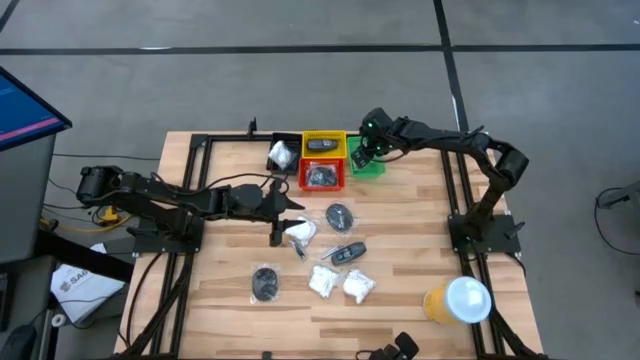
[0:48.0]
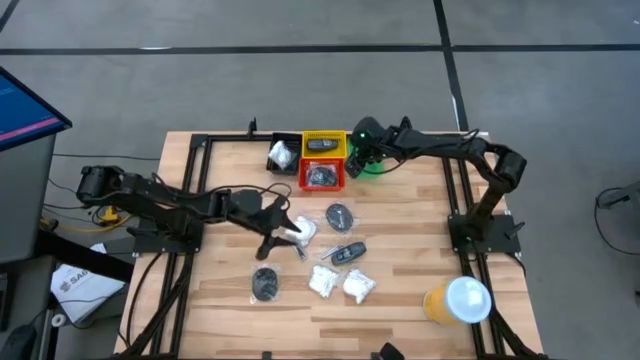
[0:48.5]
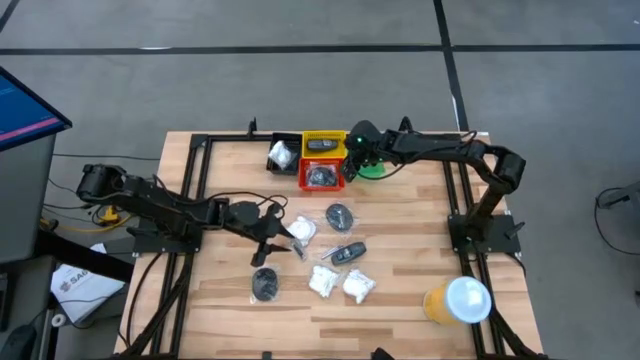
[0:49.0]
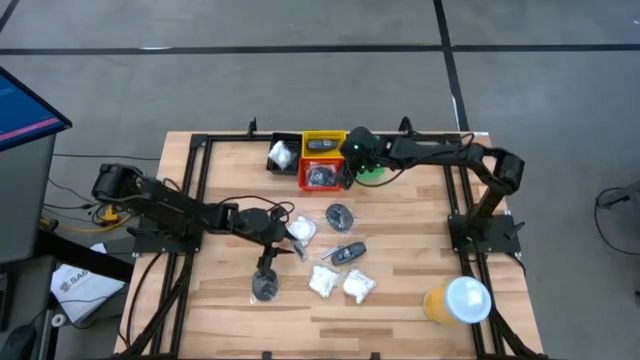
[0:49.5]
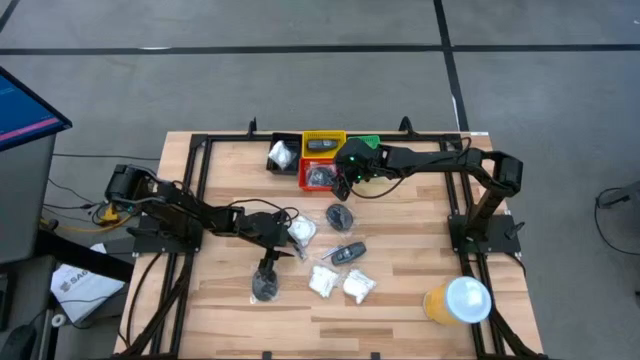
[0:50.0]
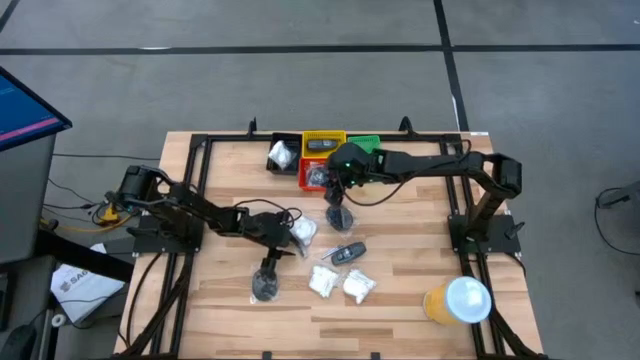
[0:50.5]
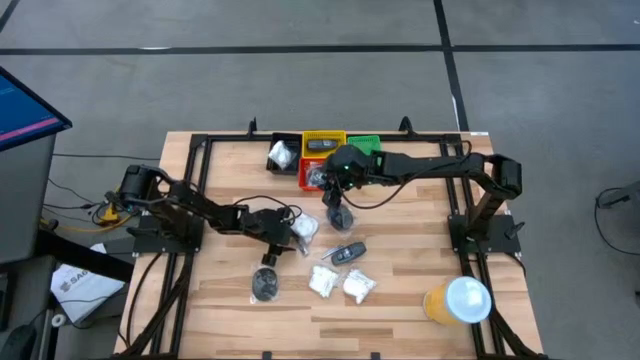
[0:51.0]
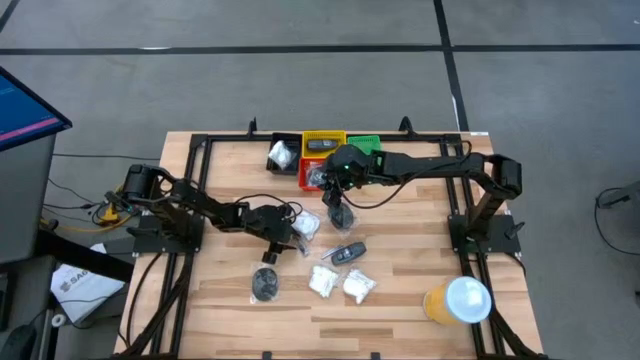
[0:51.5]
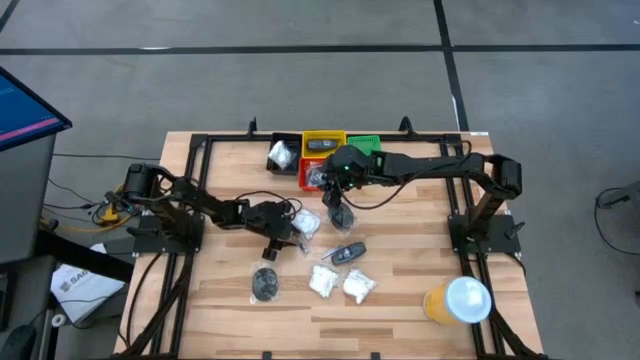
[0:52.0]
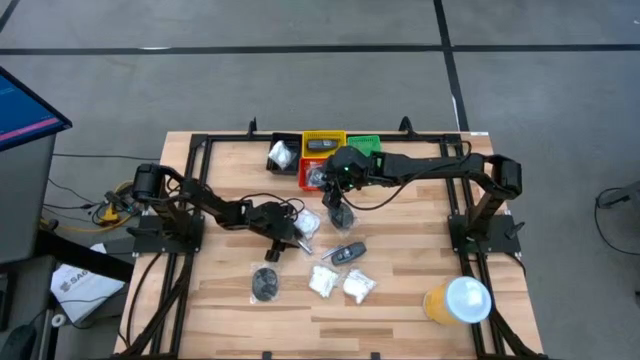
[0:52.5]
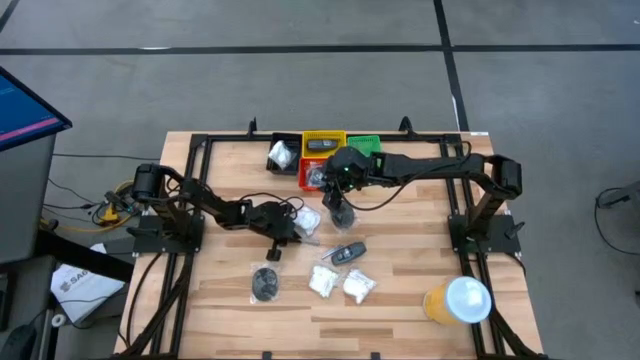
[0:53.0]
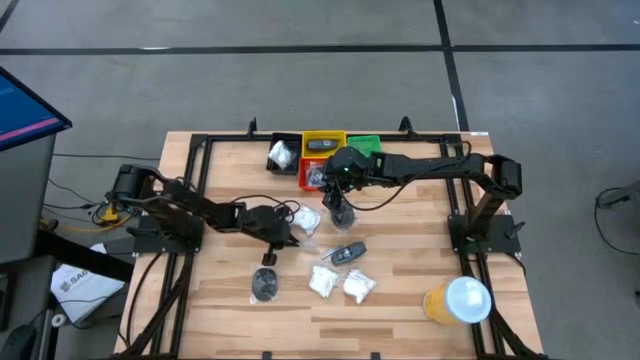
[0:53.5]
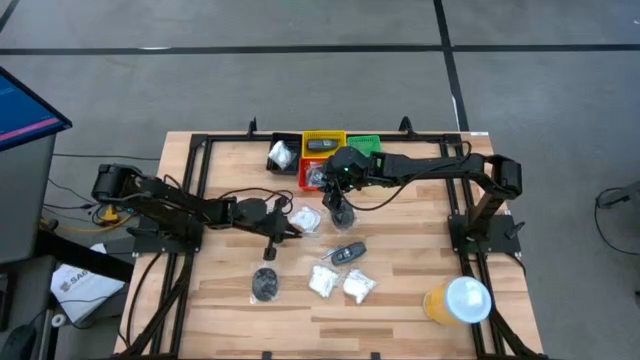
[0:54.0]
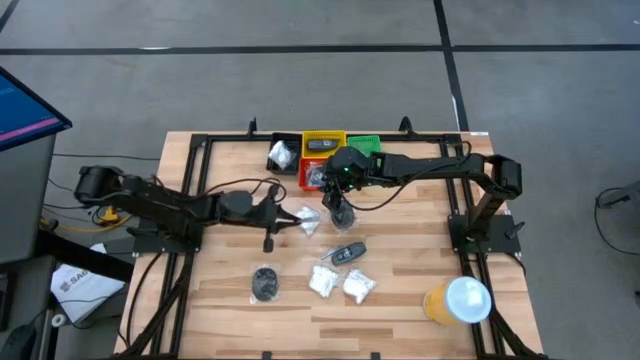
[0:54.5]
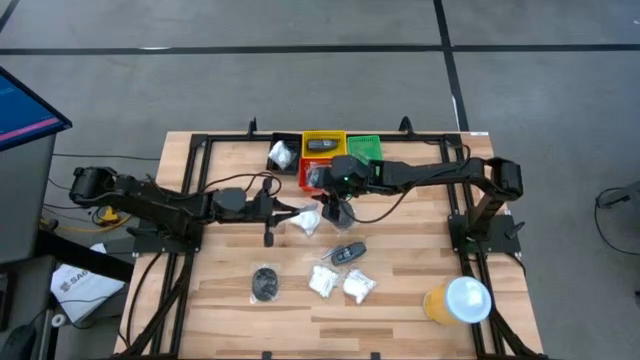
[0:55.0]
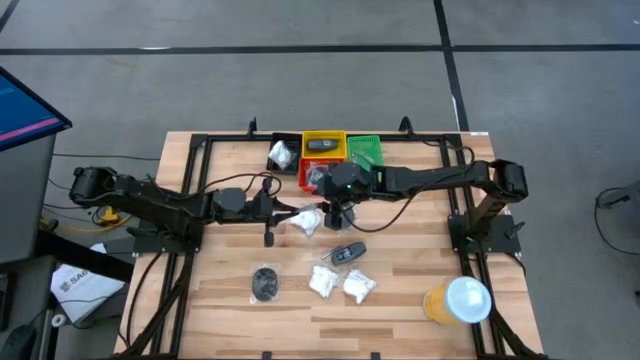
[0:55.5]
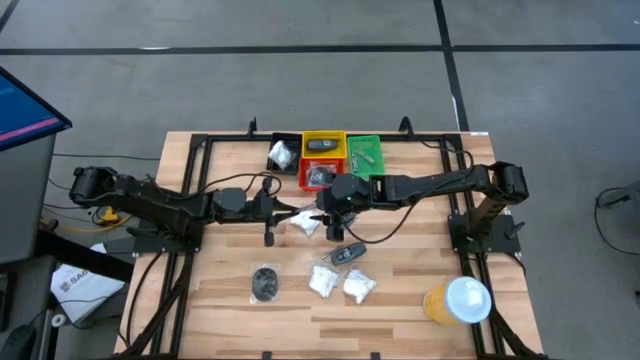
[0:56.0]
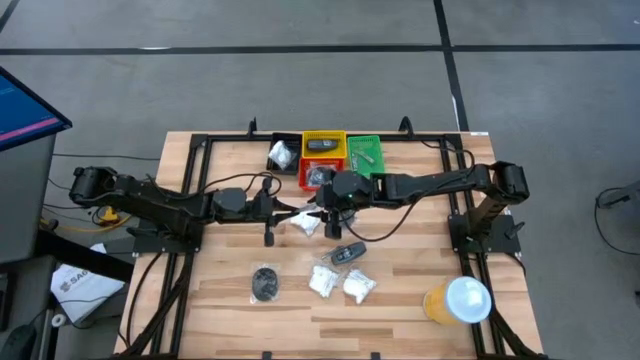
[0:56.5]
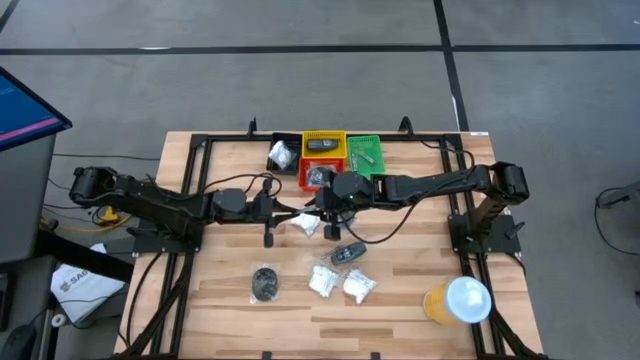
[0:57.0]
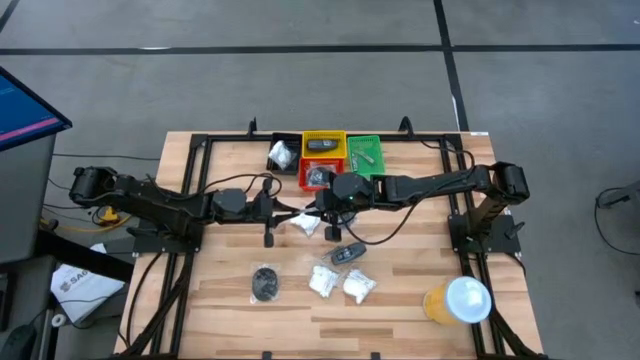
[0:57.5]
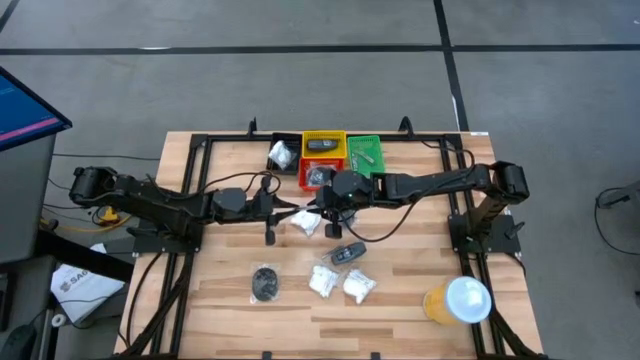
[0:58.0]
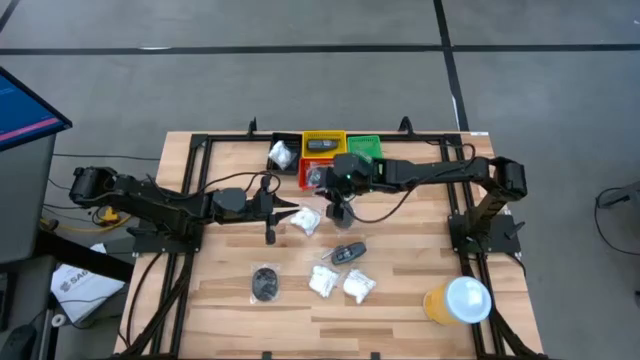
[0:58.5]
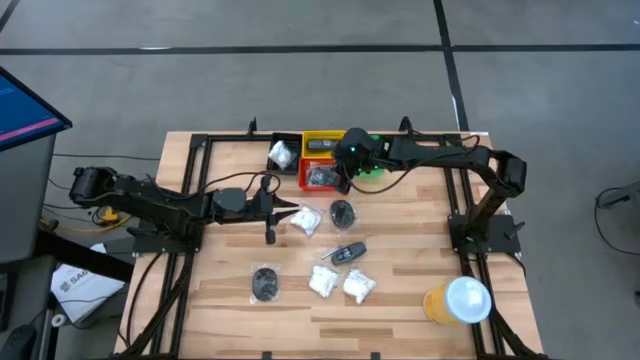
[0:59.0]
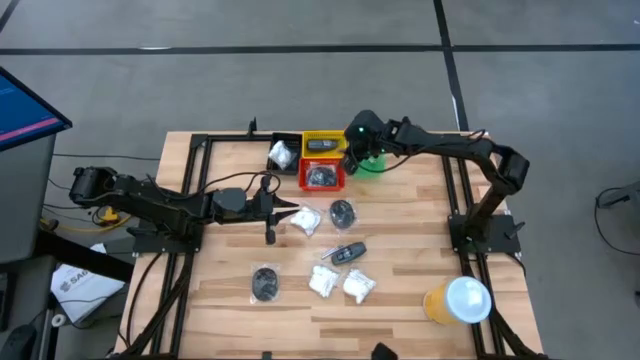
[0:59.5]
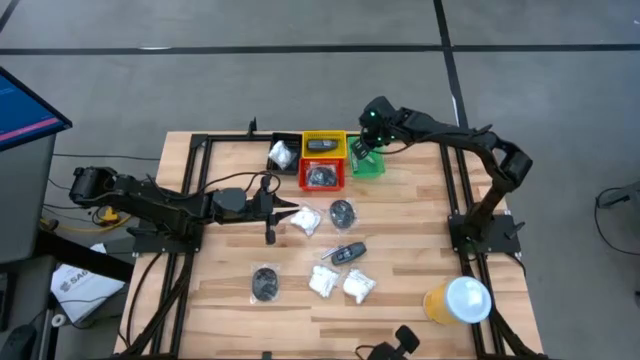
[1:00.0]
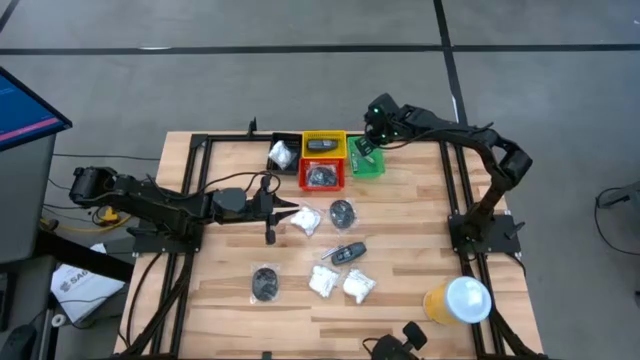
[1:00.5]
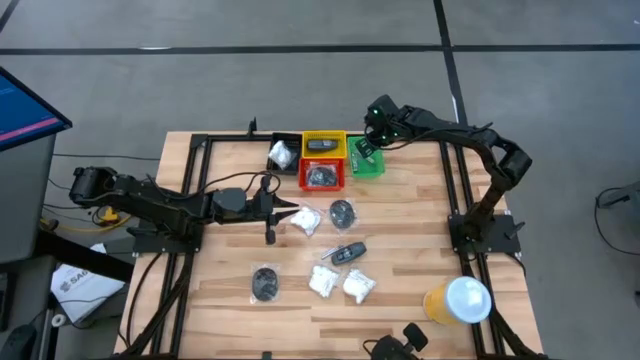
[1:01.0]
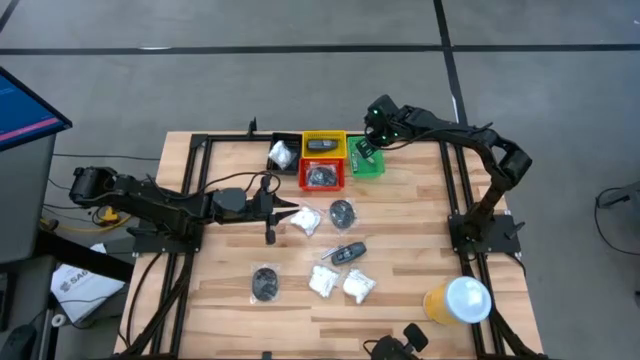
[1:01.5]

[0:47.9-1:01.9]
Task: Pick & Place Travel size toiletries
Put the silver nail cutter into the green bin

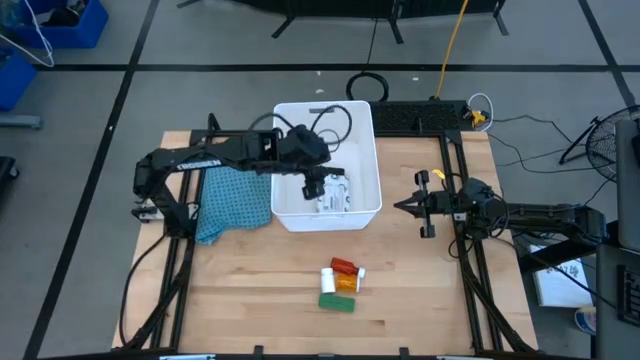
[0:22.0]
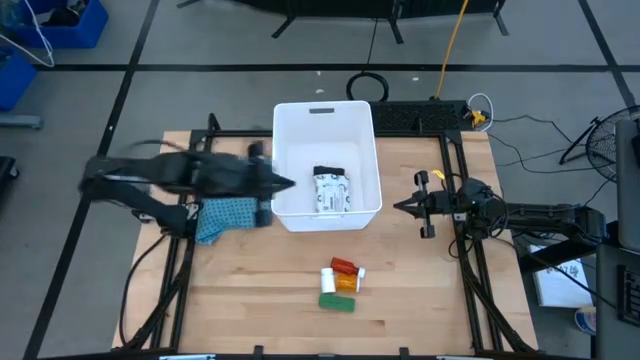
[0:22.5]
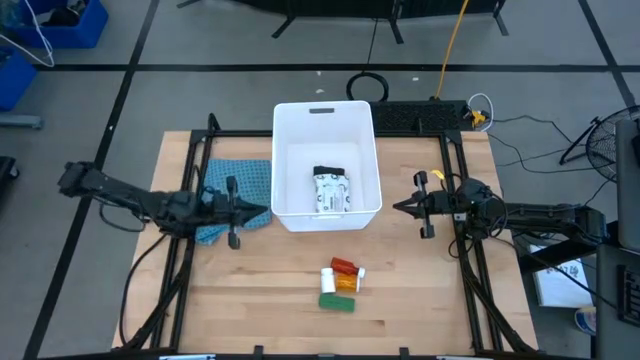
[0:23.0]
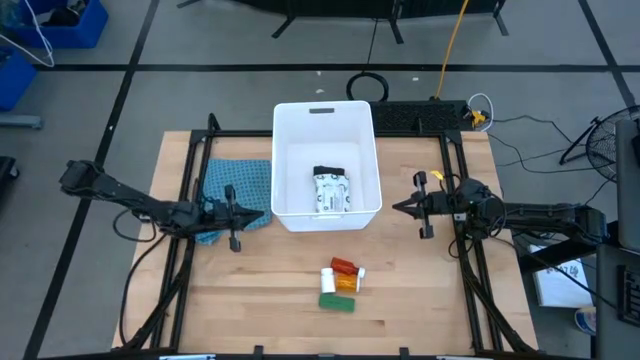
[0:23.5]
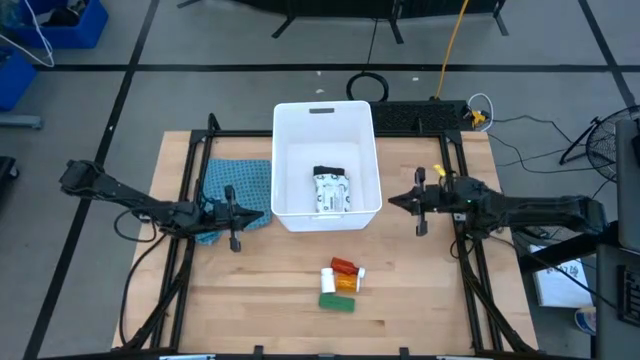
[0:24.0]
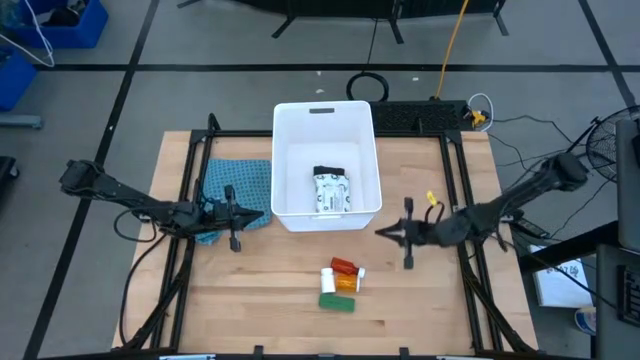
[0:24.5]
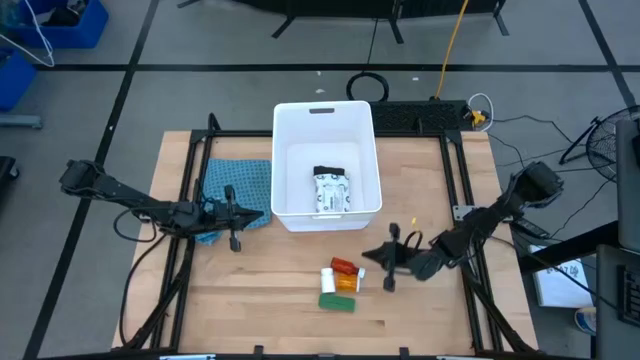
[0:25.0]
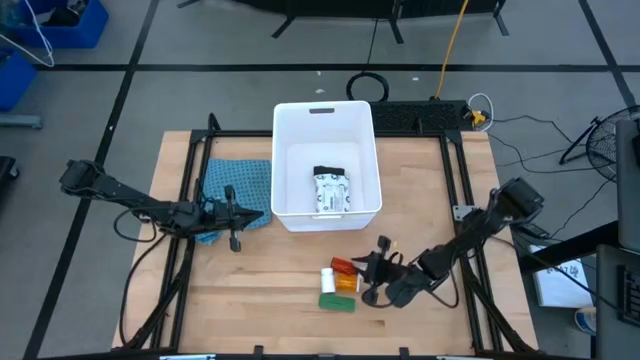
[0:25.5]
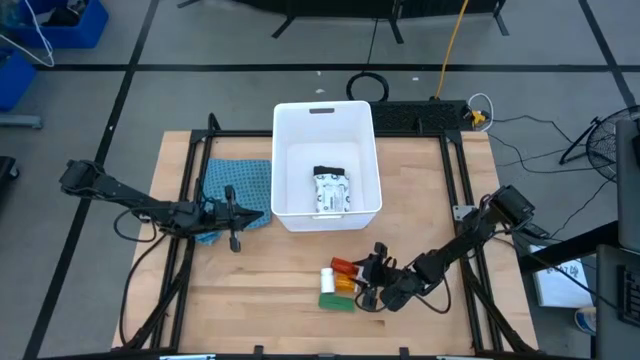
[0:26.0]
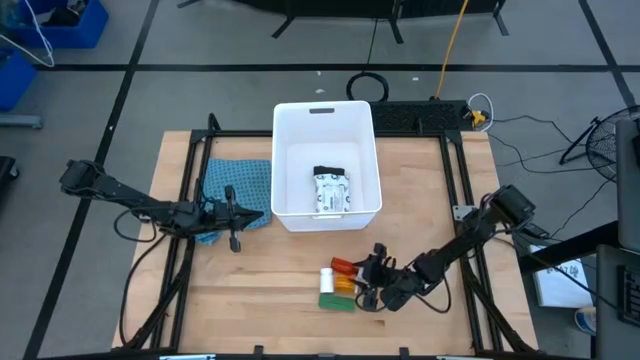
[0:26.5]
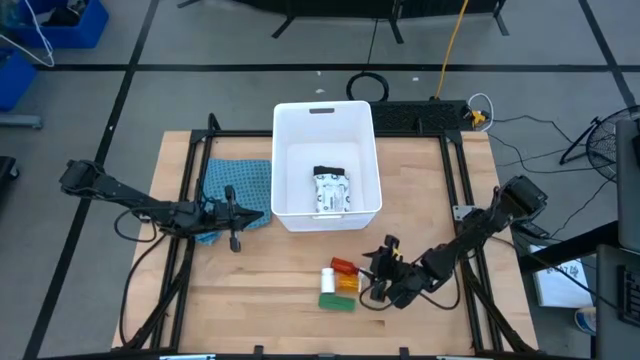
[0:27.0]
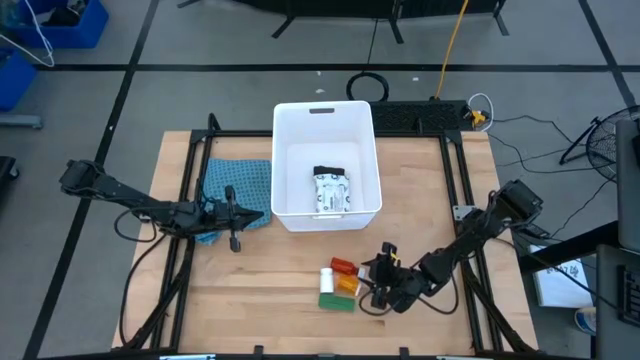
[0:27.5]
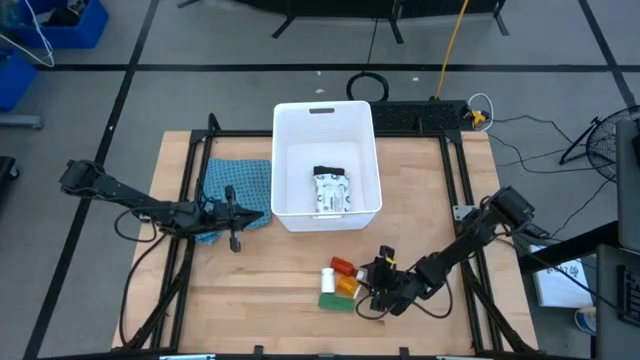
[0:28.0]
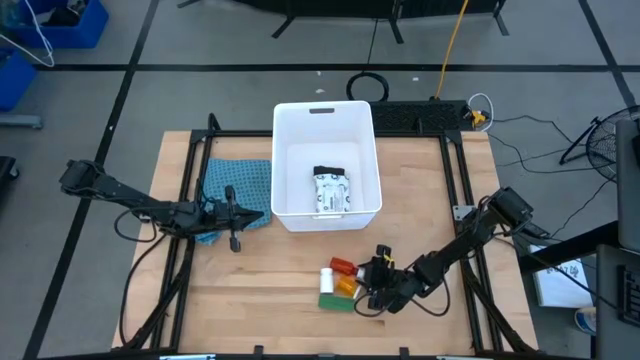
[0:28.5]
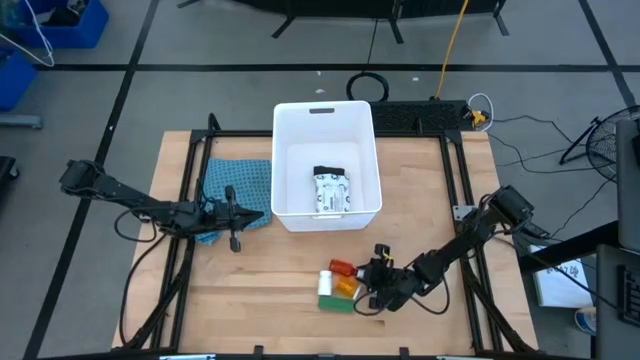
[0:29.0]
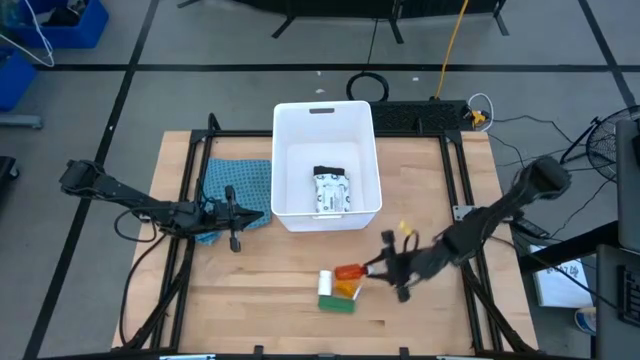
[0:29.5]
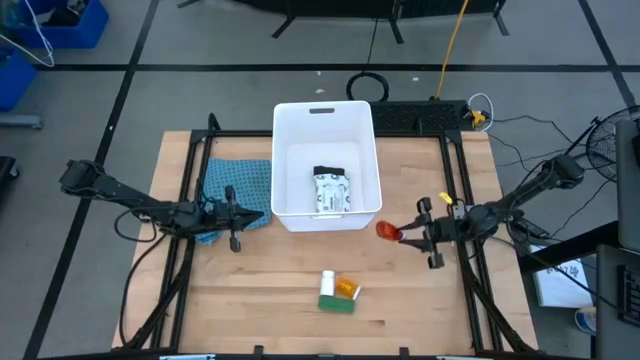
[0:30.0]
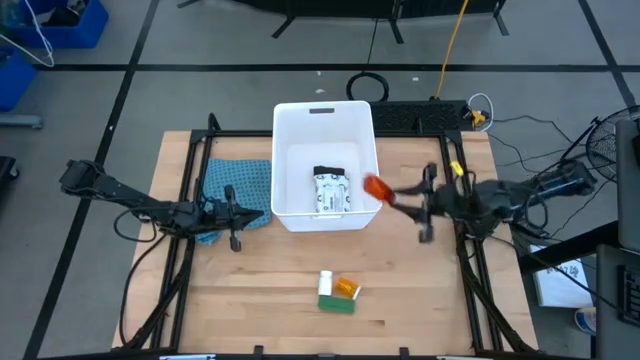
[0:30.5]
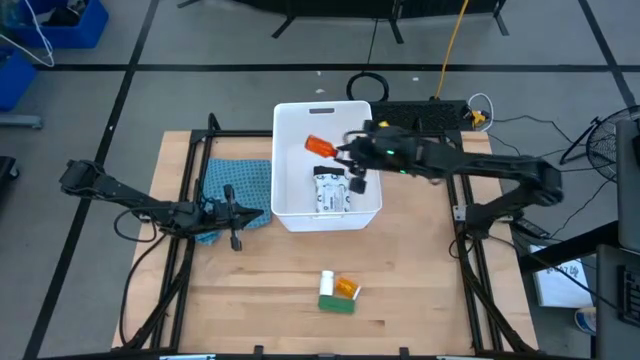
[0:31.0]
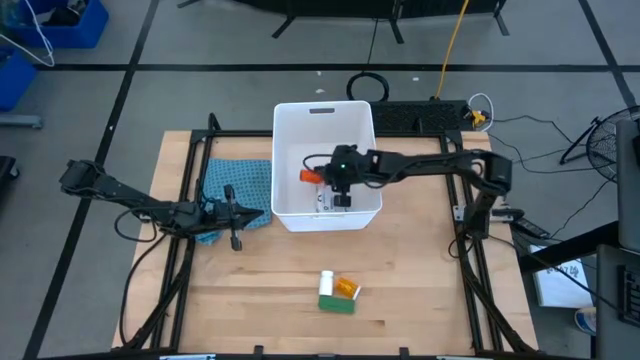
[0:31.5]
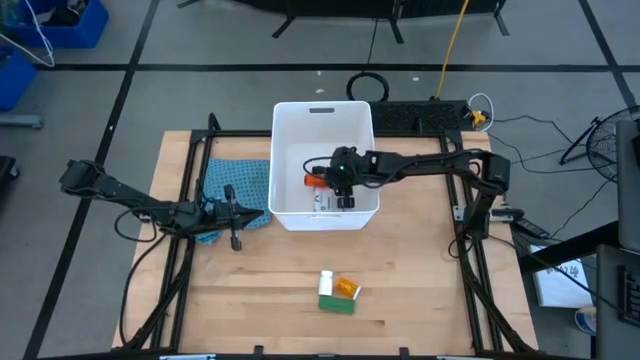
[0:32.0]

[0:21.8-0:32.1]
Task: Pick & place medical supplies in basket/bin
Put the red medicine bottle into the white container
